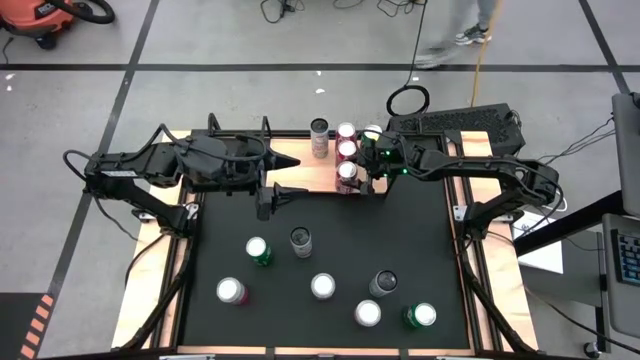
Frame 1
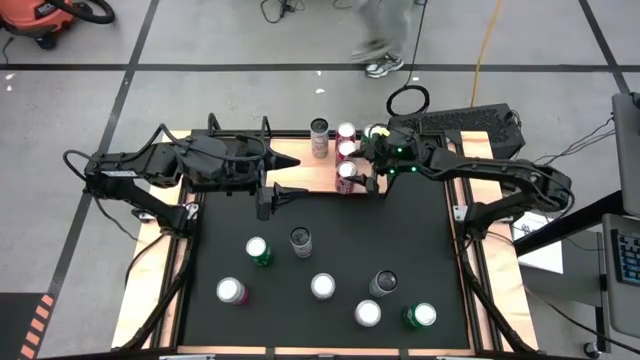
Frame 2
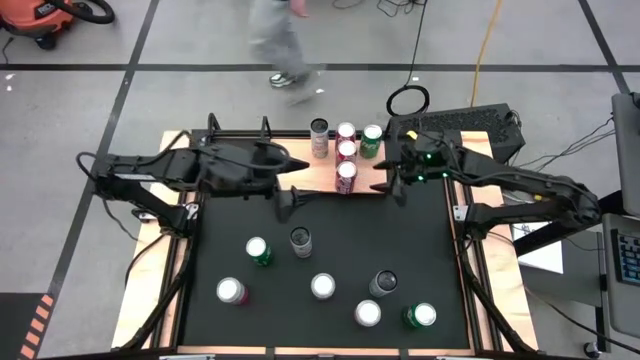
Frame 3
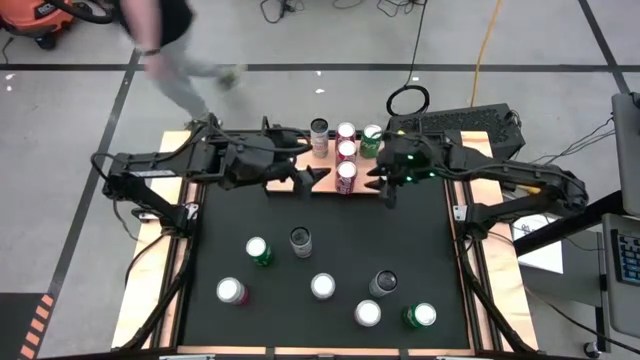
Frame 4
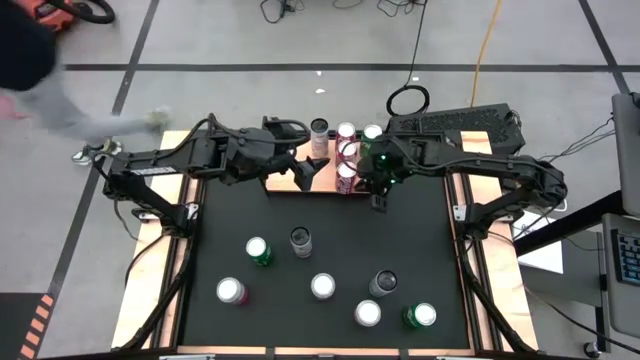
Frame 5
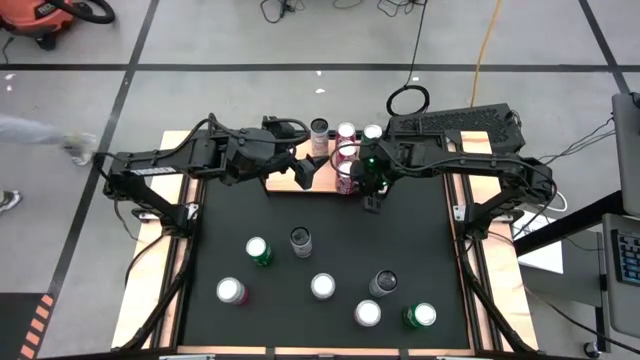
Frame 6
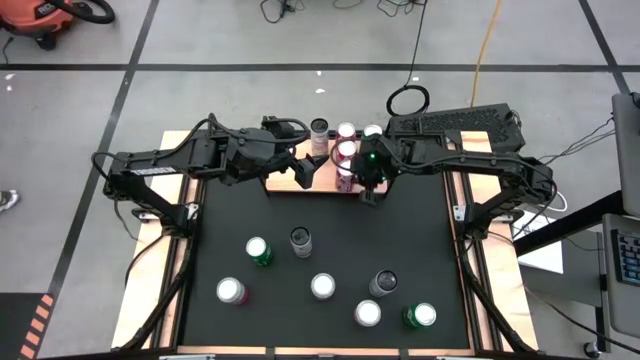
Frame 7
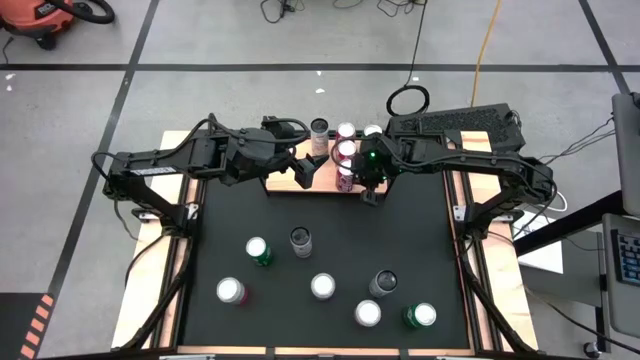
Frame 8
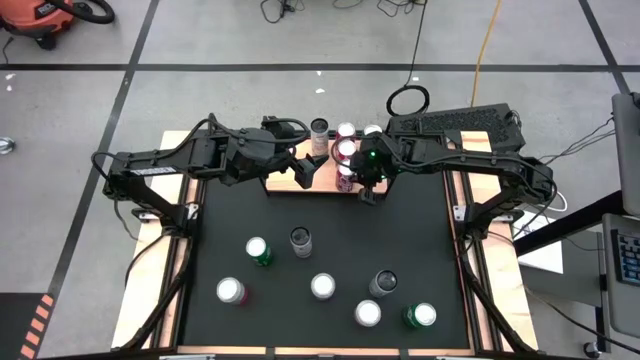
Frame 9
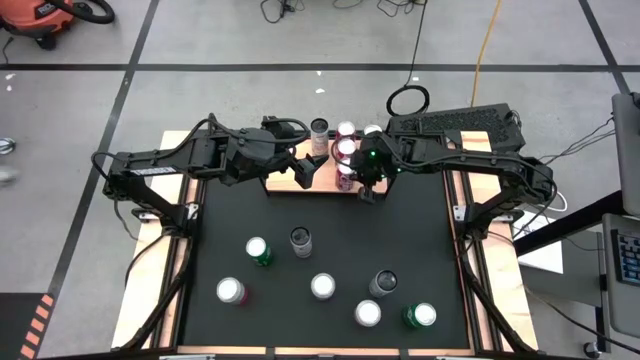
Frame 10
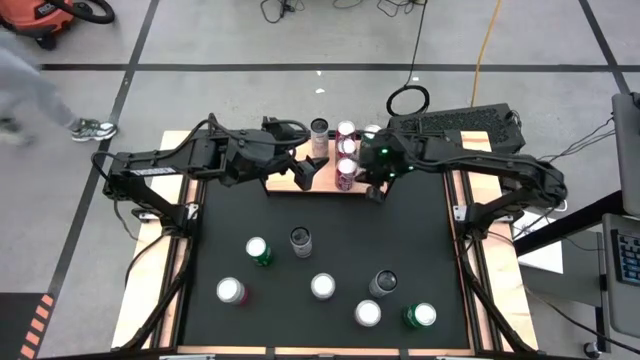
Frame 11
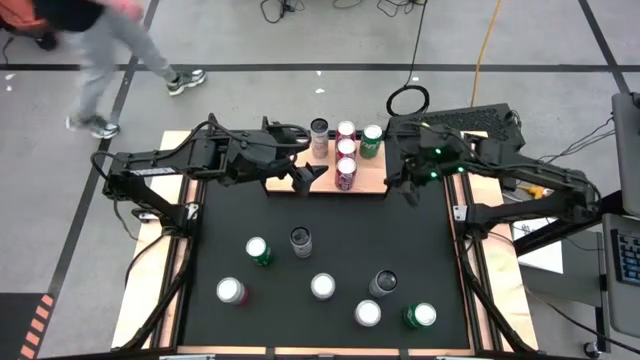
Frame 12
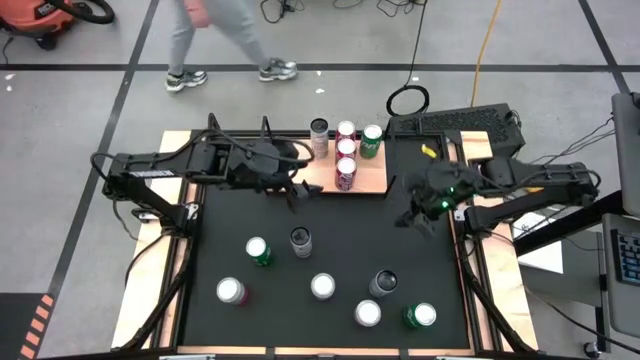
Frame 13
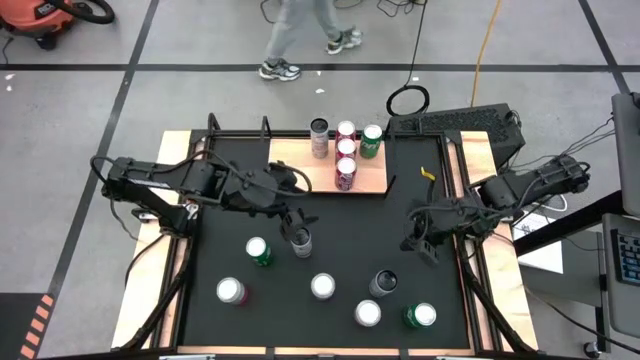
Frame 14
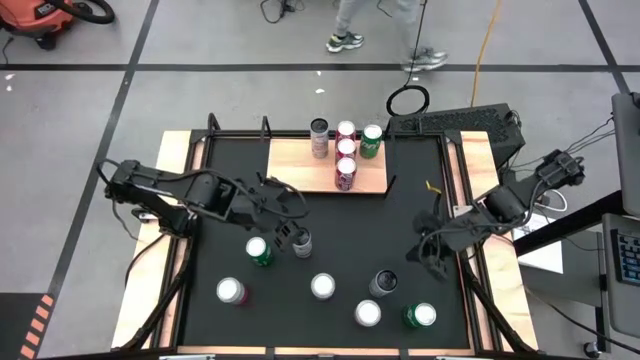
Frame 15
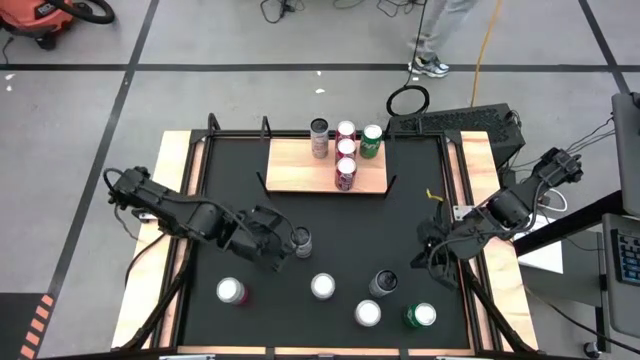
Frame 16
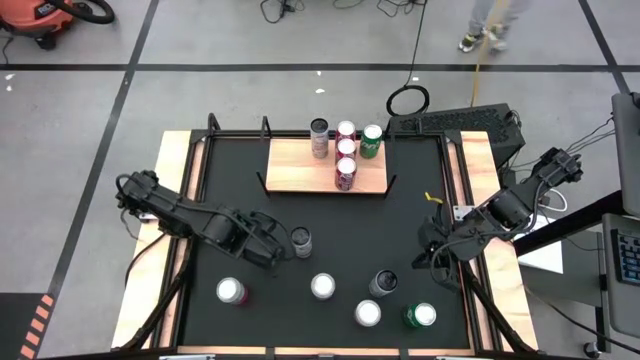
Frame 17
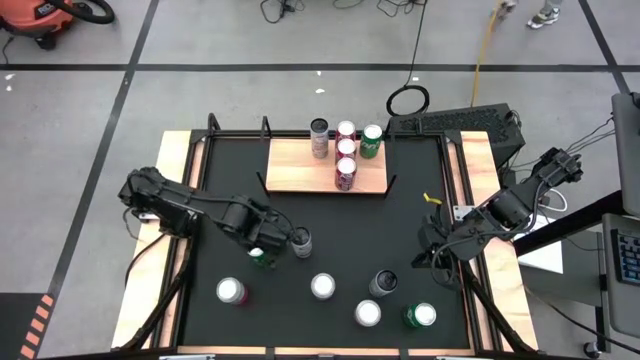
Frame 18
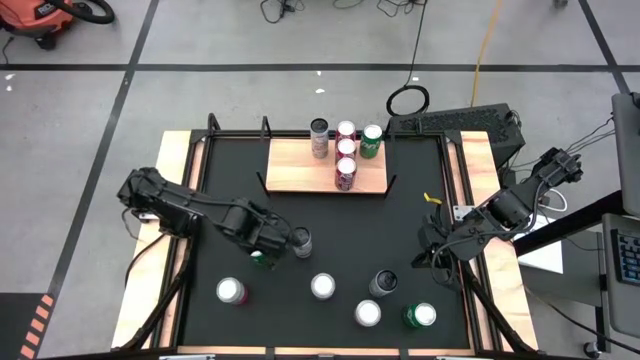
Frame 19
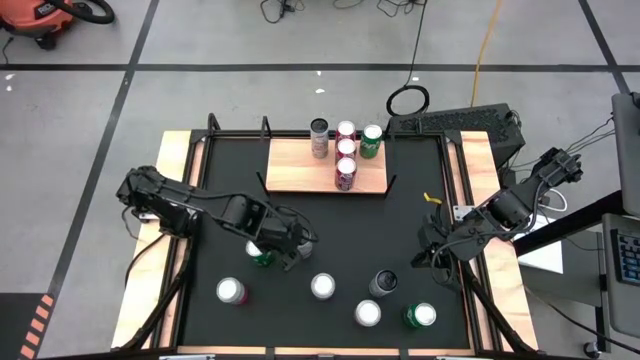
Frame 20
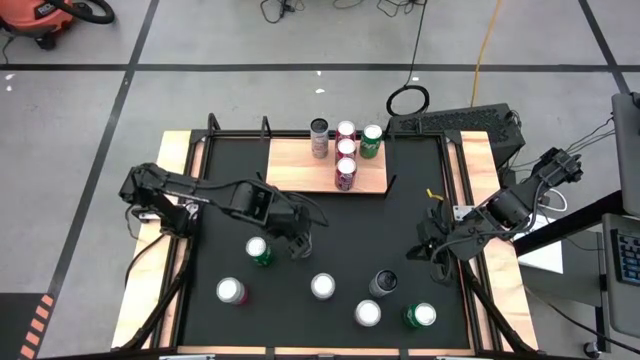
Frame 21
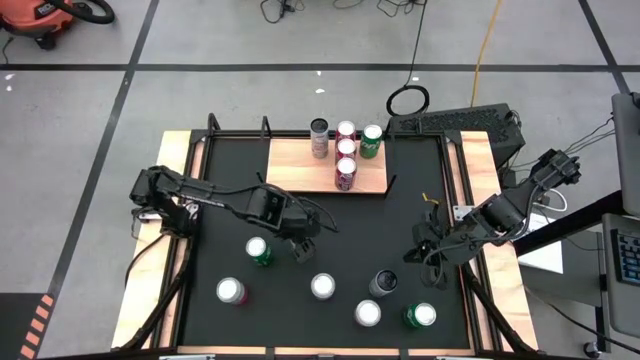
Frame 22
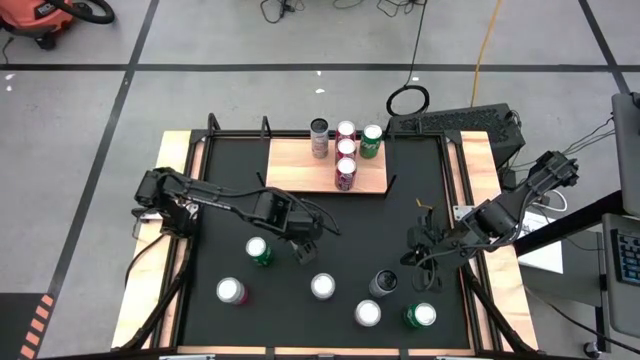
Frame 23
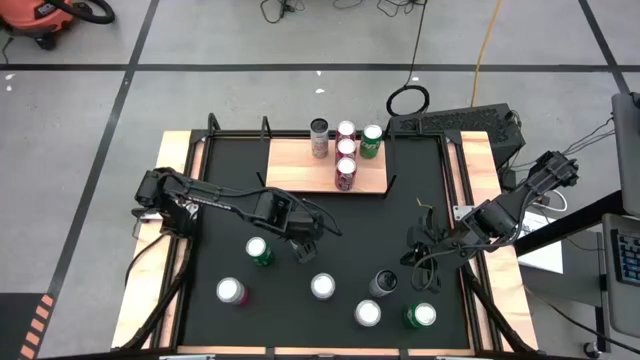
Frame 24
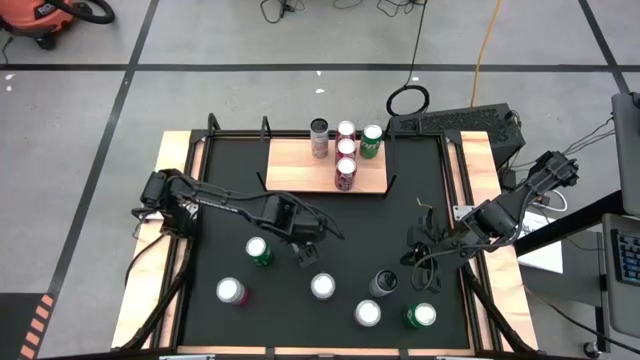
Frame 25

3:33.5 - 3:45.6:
Task: Place canned beverage on shelf
Put the top left white soda can on the shelf

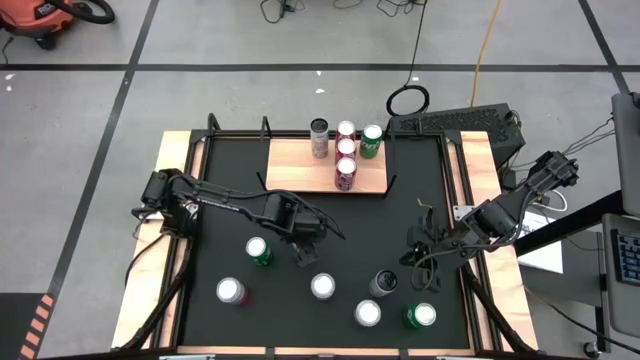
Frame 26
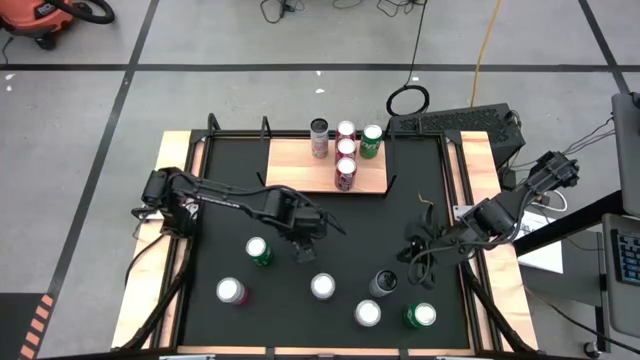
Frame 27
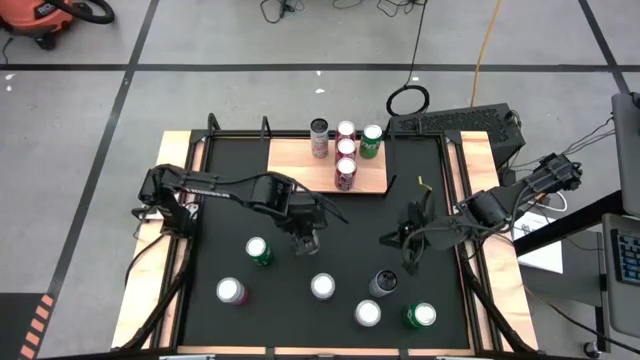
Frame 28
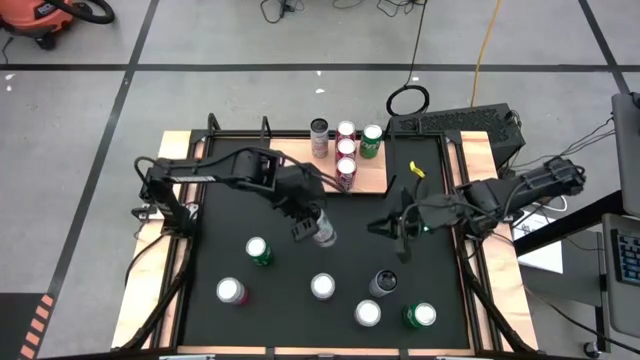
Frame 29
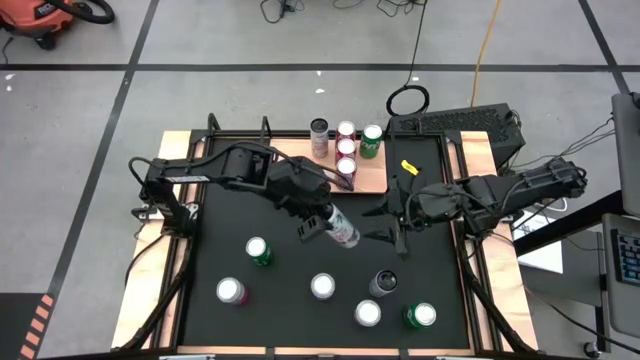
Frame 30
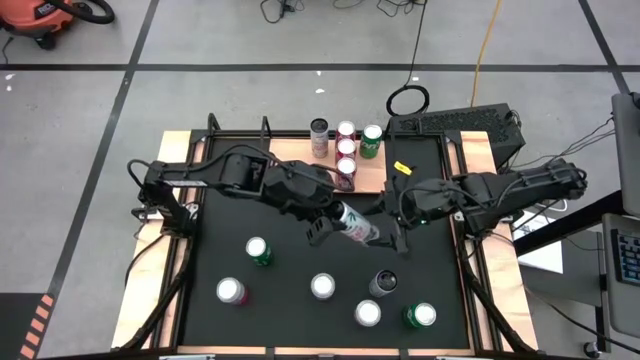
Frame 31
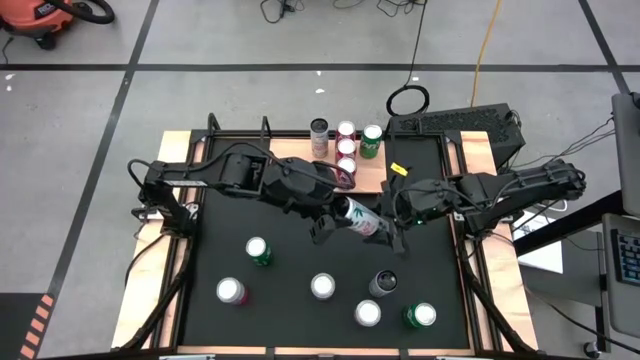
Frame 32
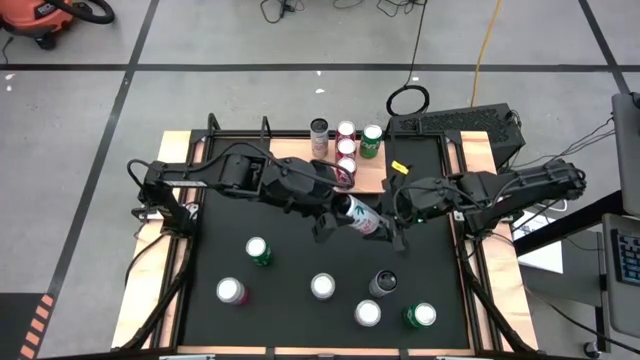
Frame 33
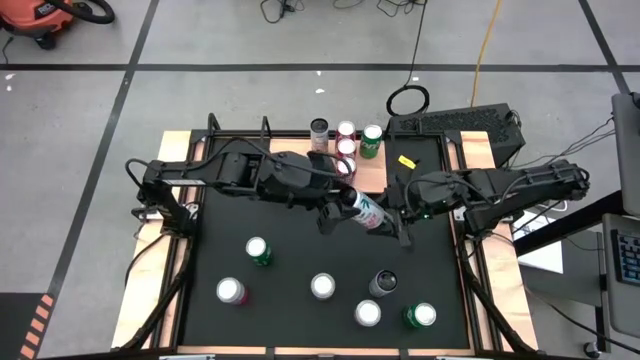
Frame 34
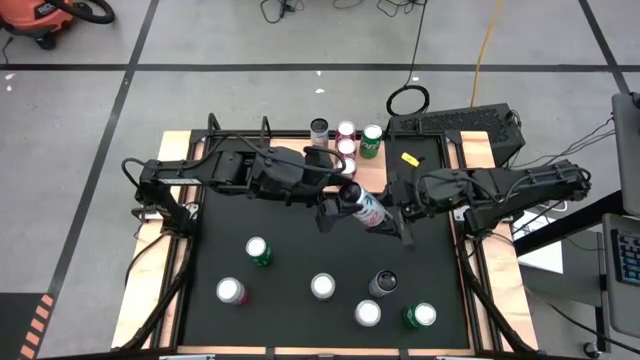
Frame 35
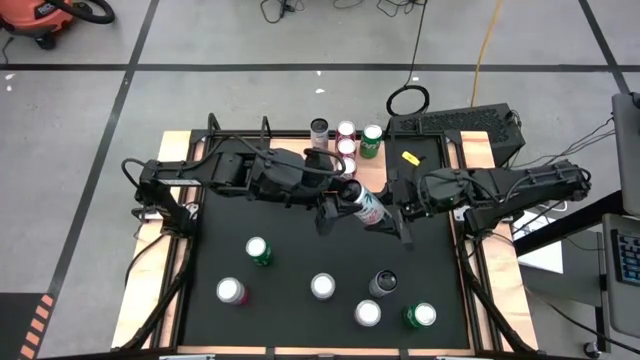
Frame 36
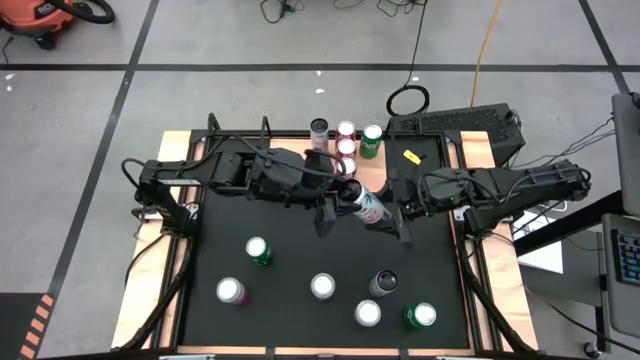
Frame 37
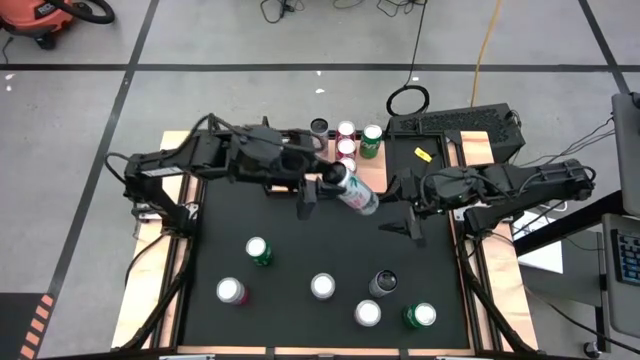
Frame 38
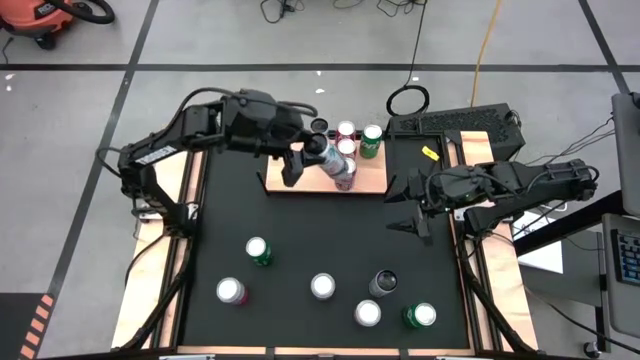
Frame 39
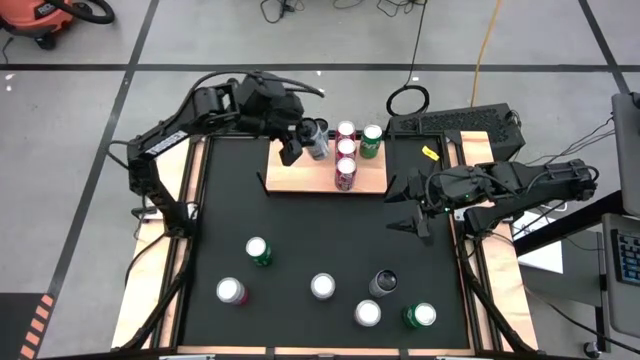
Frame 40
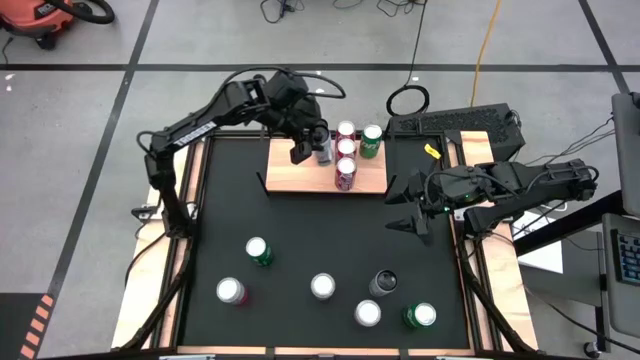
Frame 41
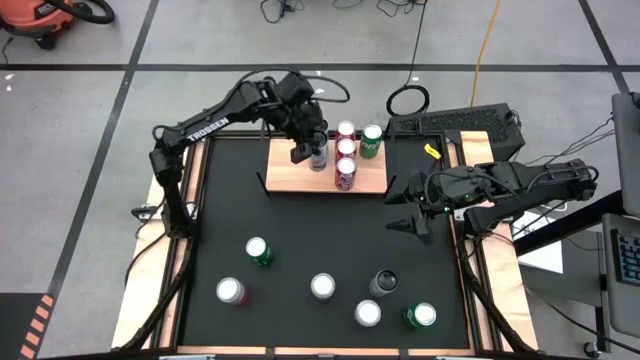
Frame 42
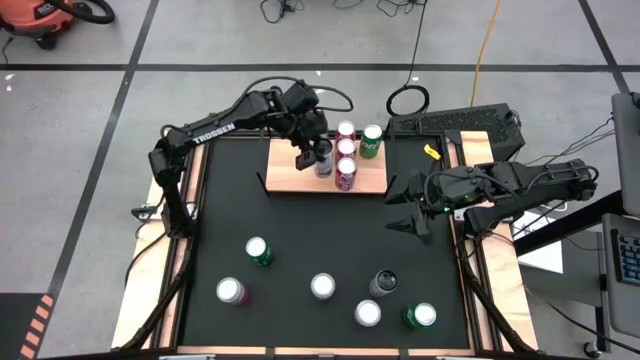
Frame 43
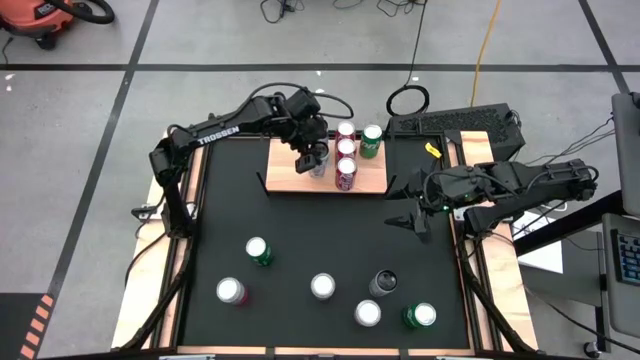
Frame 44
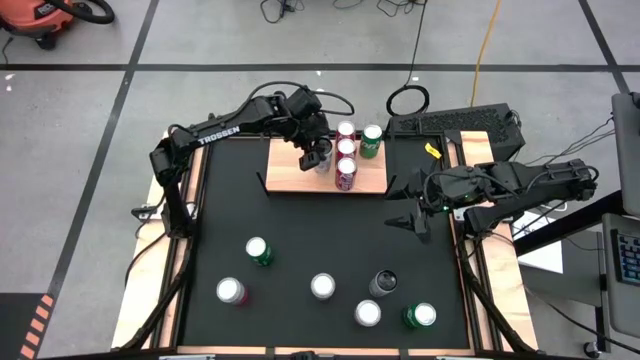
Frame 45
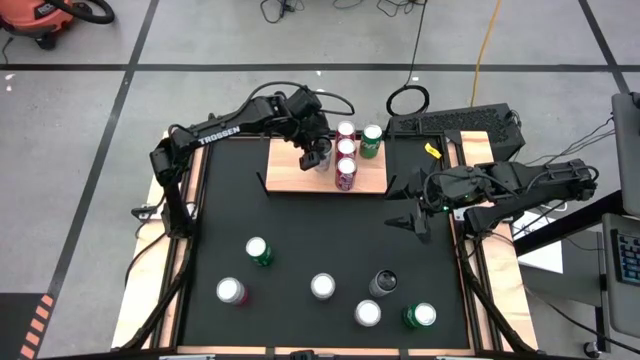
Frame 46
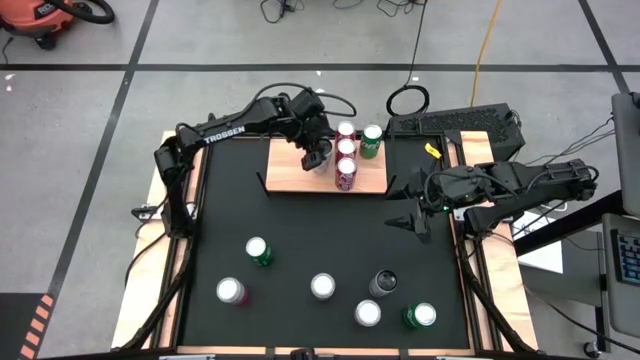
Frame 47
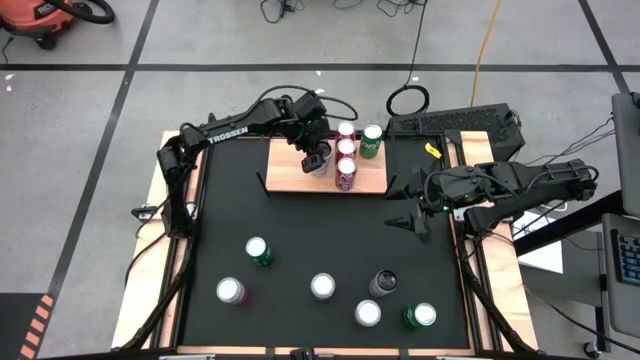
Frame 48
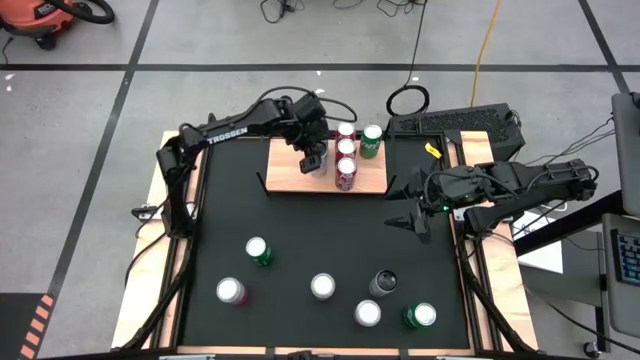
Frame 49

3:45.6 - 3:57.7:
Put the top left white soda can on the shelf
